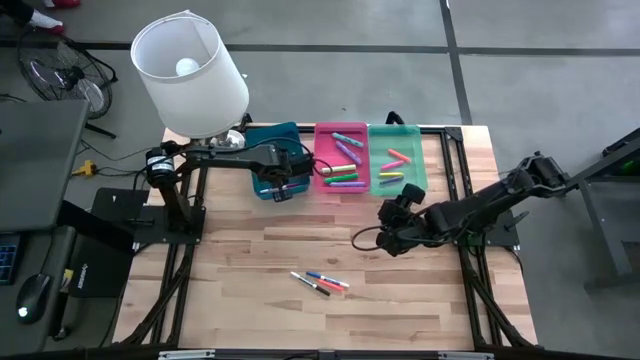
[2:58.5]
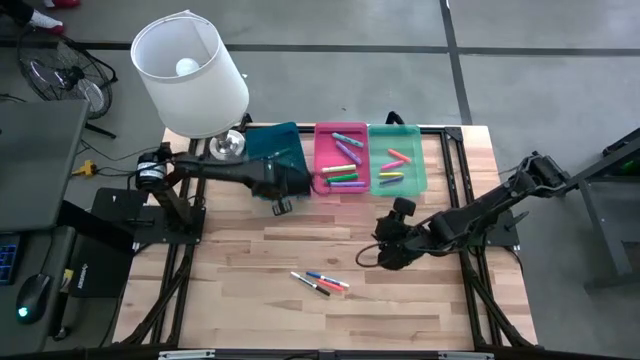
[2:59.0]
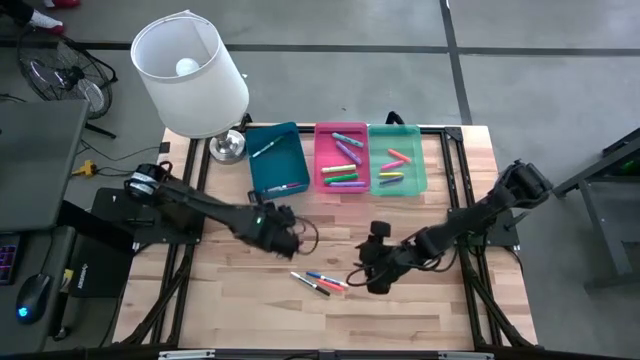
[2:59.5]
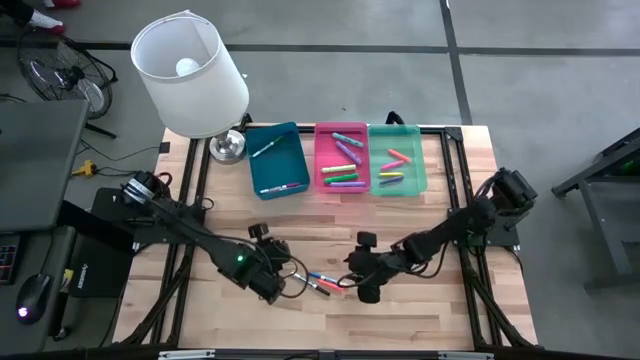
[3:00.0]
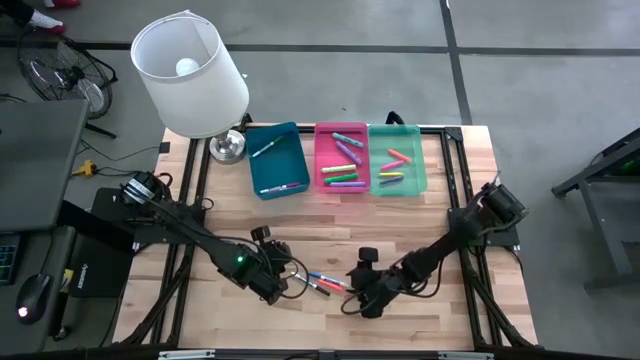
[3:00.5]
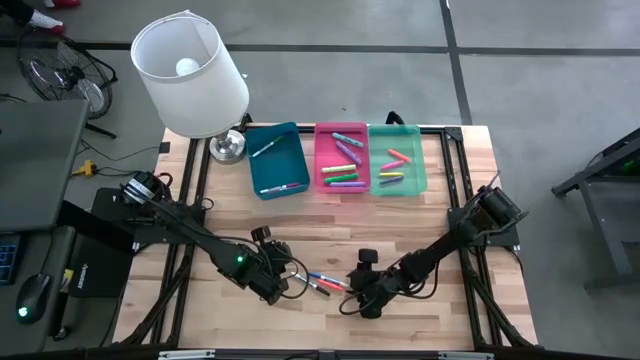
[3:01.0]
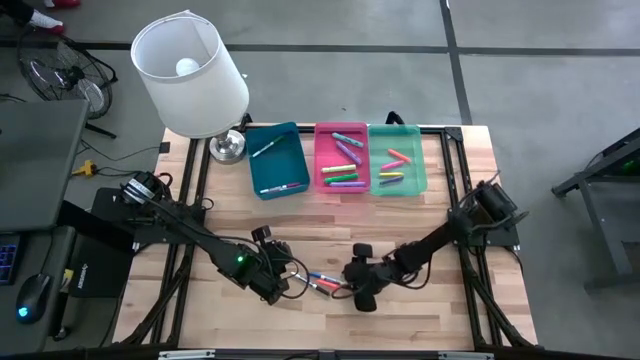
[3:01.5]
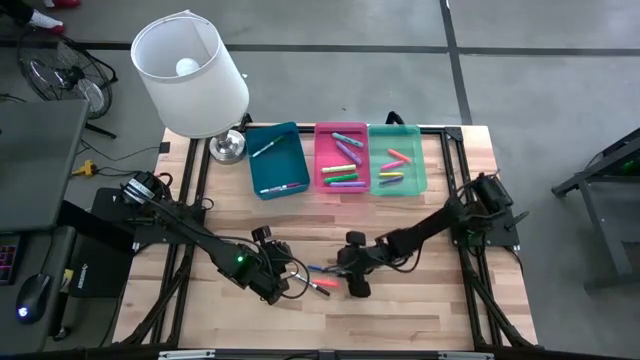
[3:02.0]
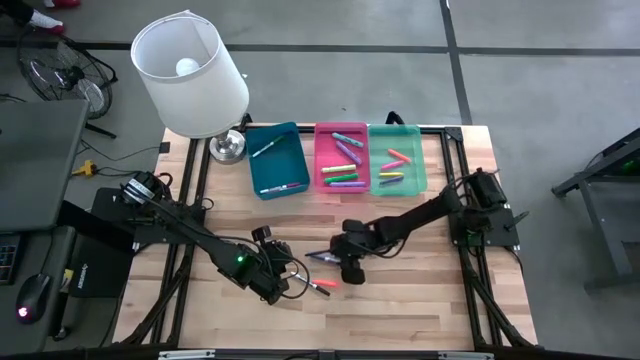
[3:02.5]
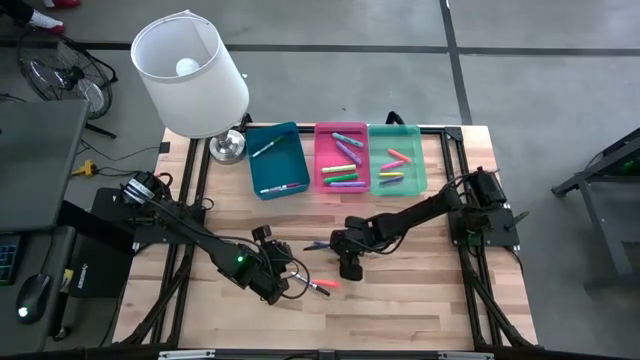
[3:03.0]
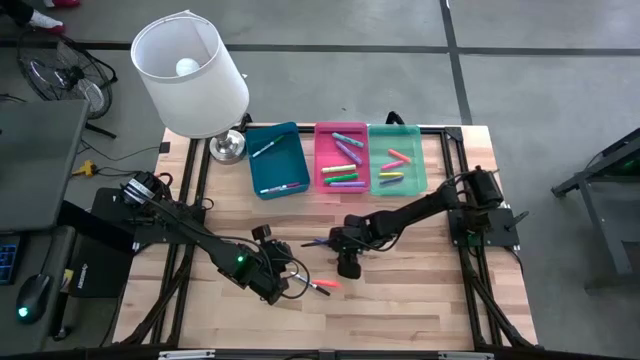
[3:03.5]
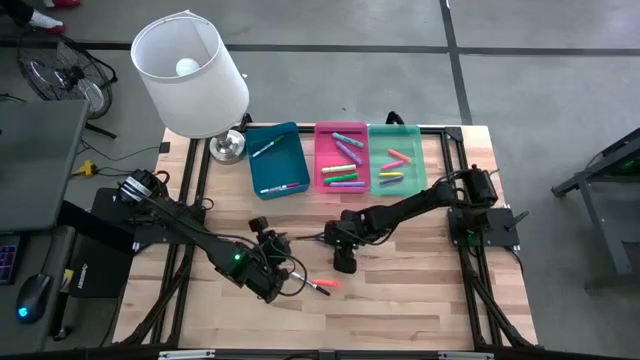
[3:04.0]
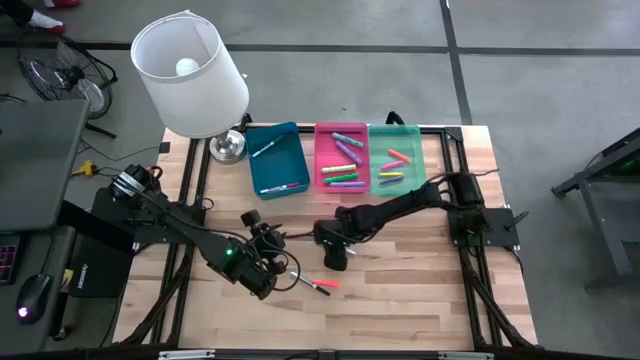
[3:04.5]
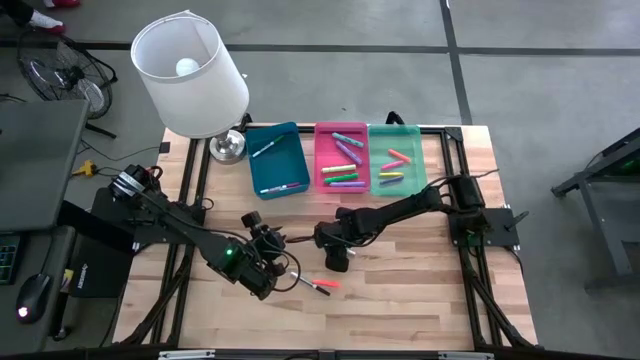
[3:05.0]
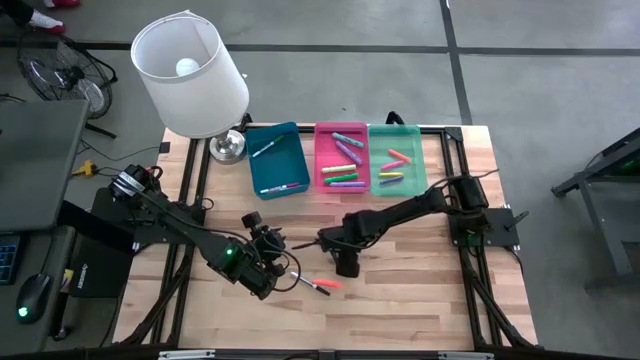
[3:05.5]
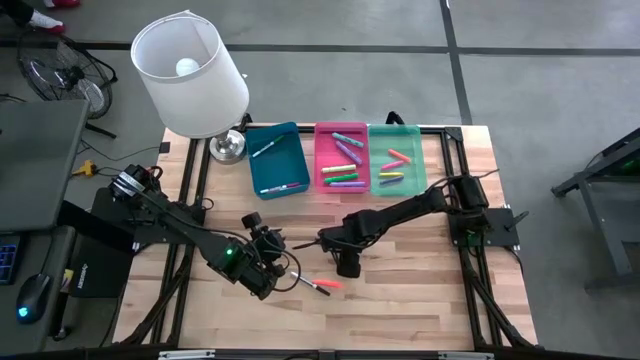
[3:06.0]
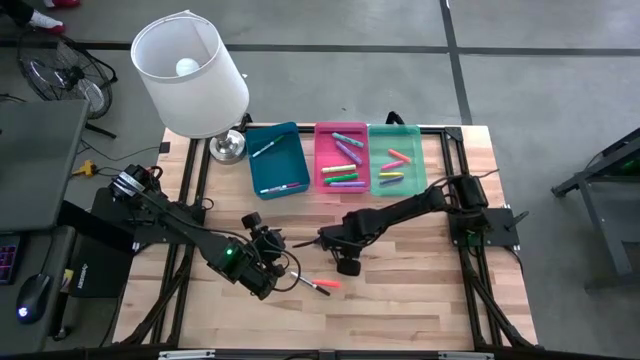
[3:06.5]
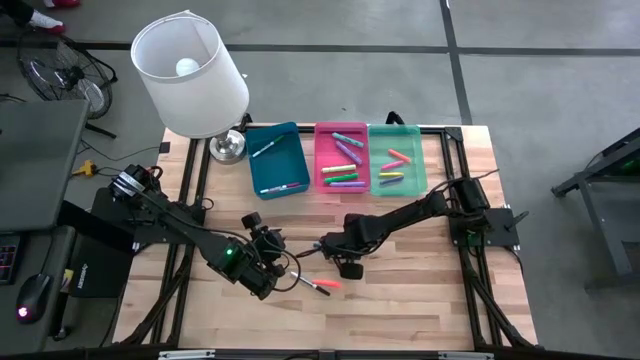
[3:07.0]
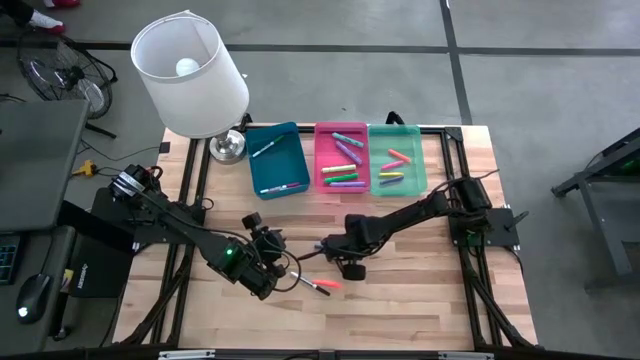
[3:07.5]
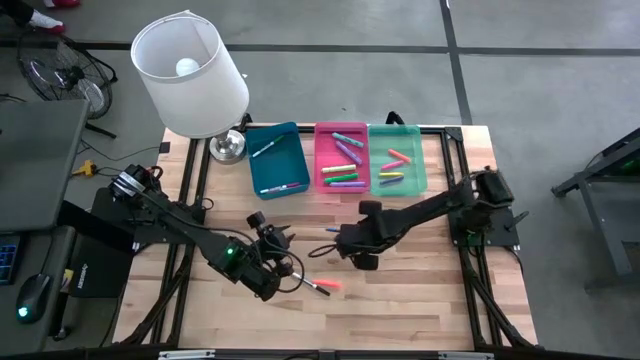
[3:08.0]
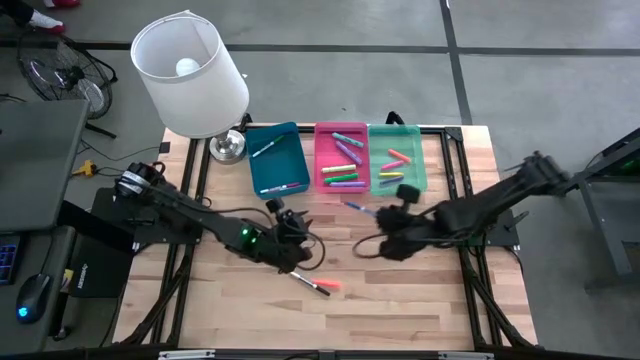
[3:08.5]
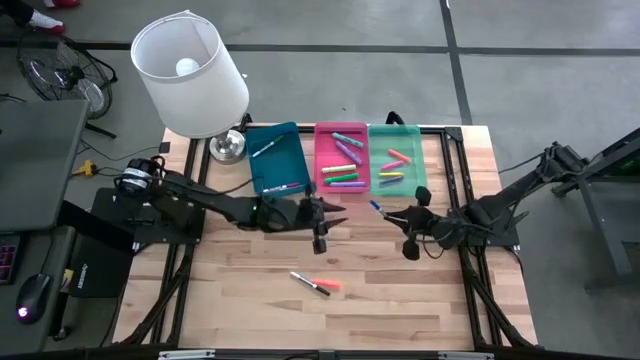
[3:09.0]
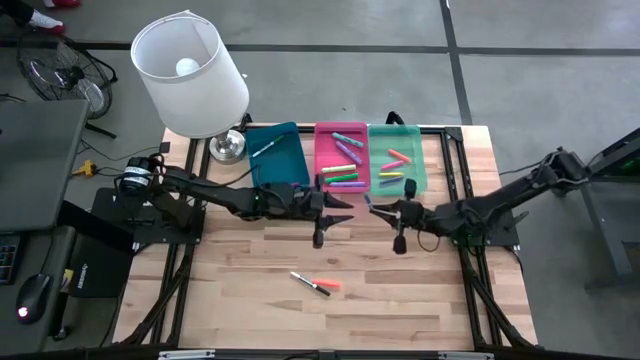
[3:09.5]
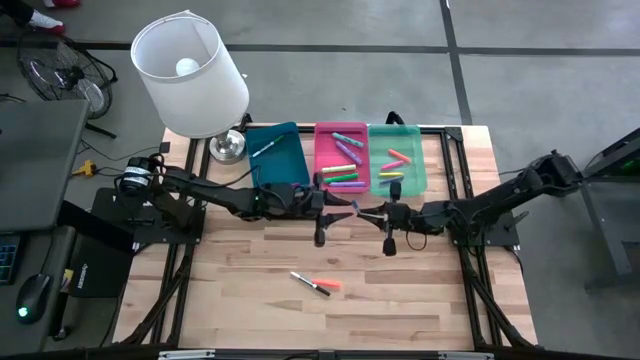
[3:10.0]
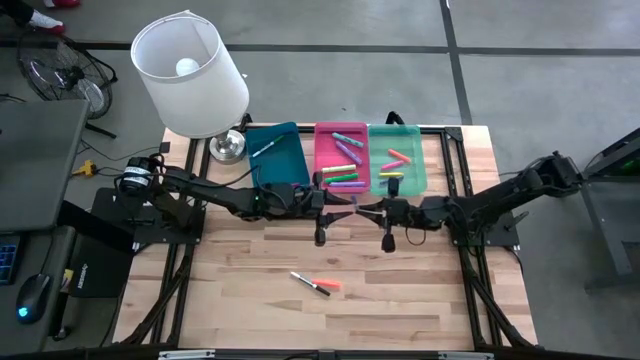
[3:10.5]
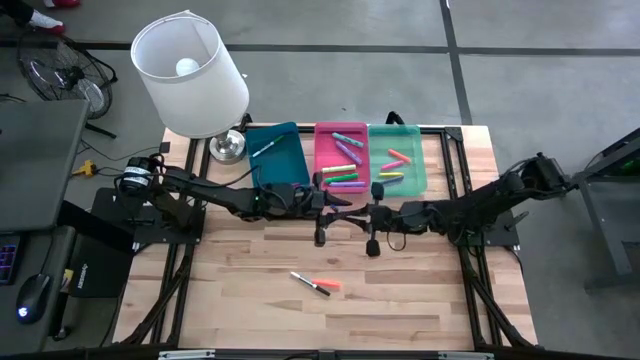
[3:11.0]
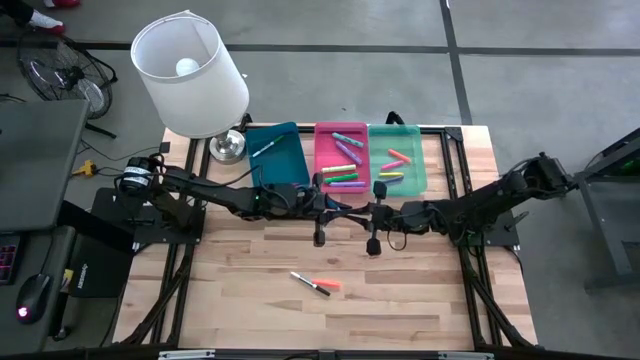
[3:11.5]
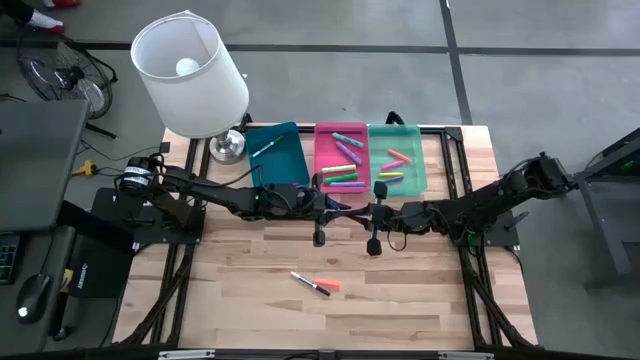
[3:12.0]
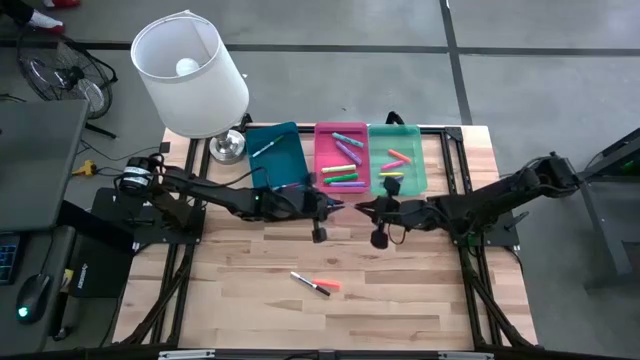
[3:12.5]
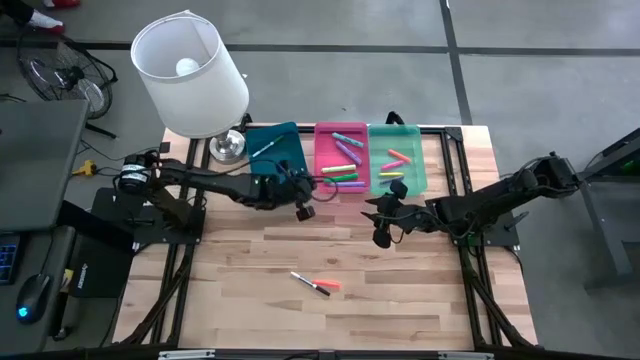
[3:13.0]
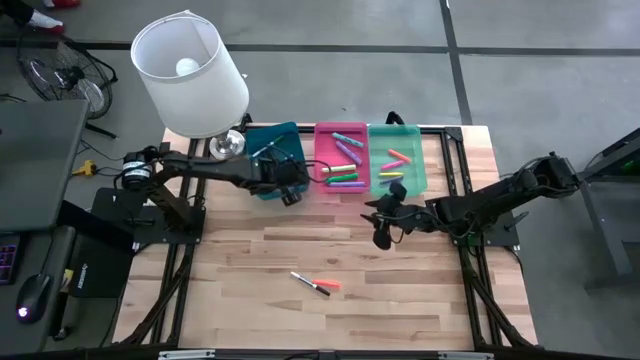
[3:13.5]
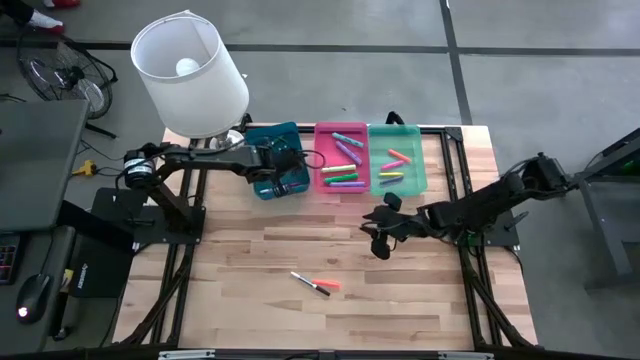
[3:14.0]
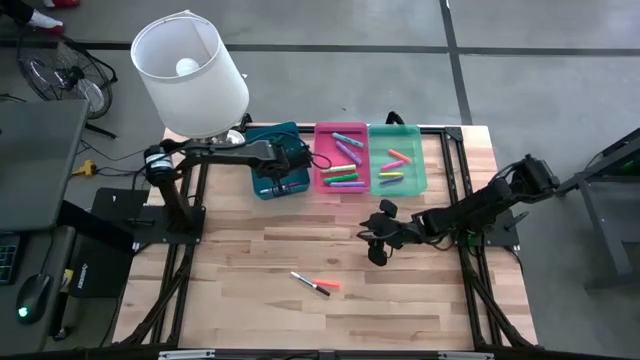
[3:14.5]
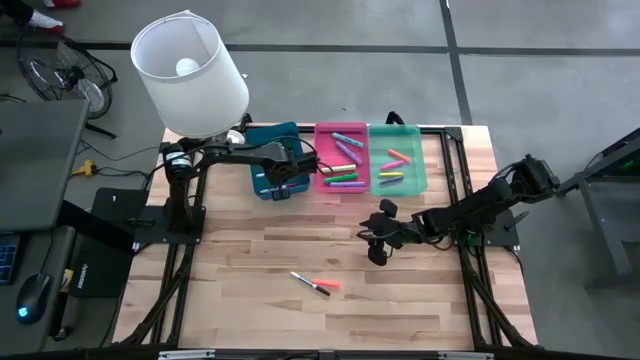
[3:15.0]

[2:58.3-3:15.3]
Task: Pick & Place Markers
Put the blue dry erase marker into the dark blue bin

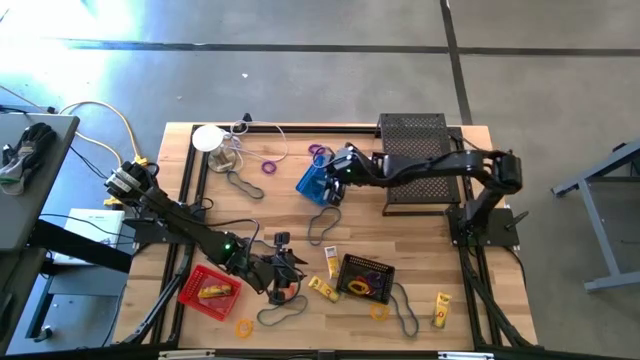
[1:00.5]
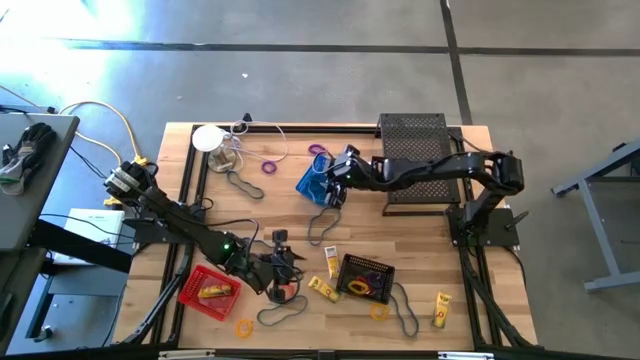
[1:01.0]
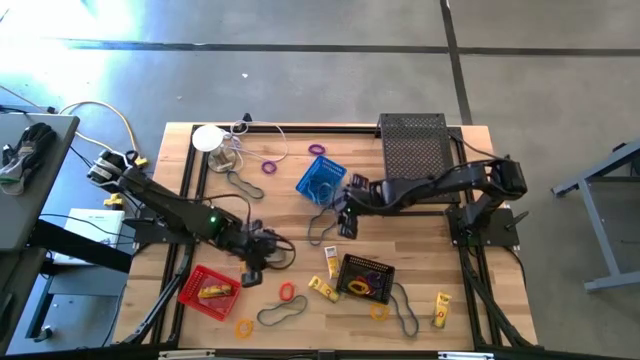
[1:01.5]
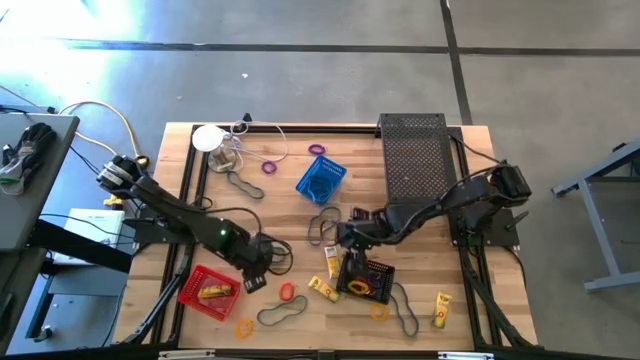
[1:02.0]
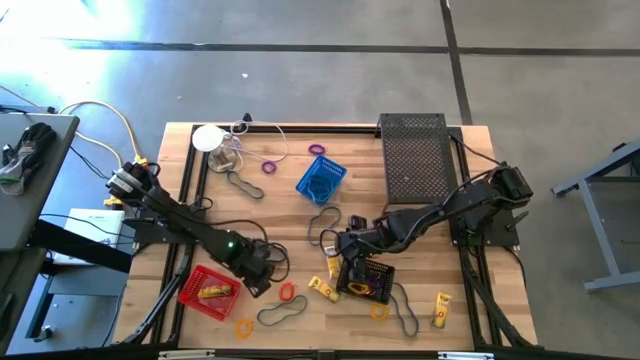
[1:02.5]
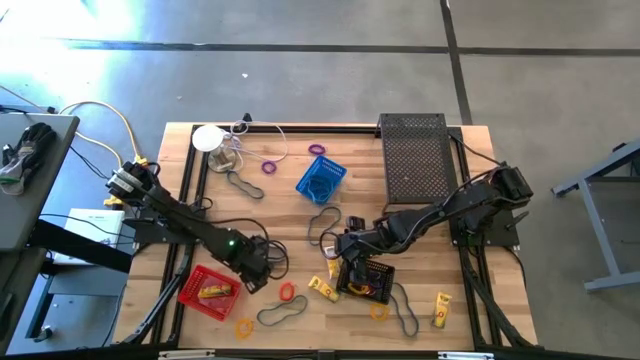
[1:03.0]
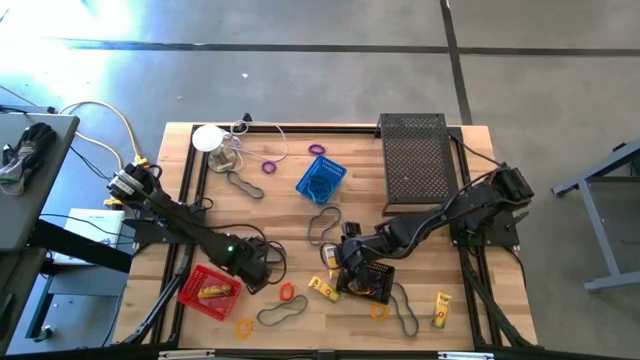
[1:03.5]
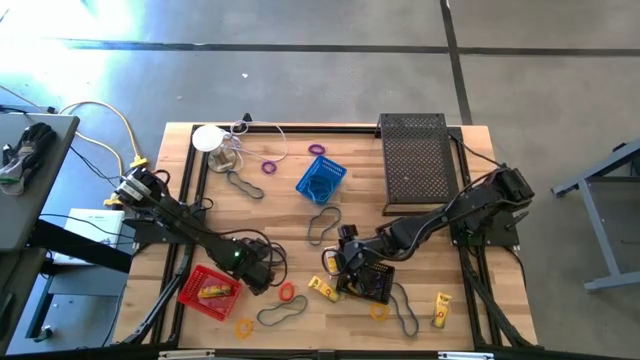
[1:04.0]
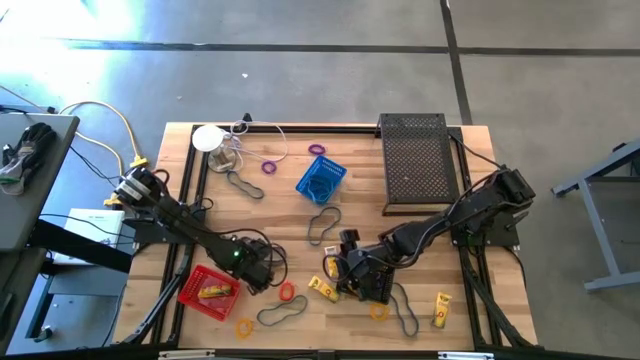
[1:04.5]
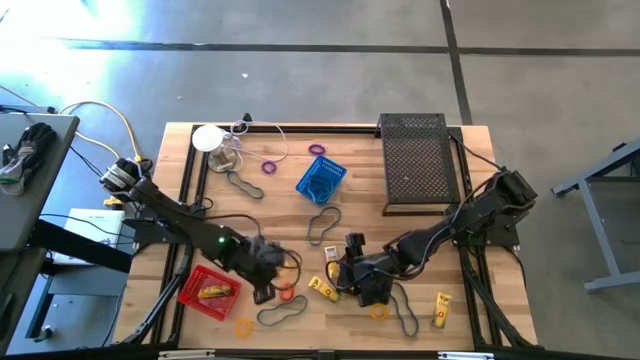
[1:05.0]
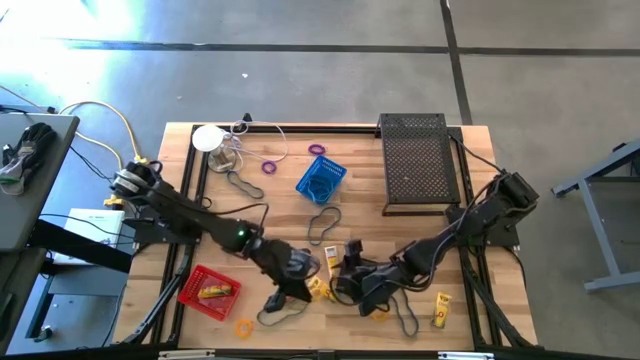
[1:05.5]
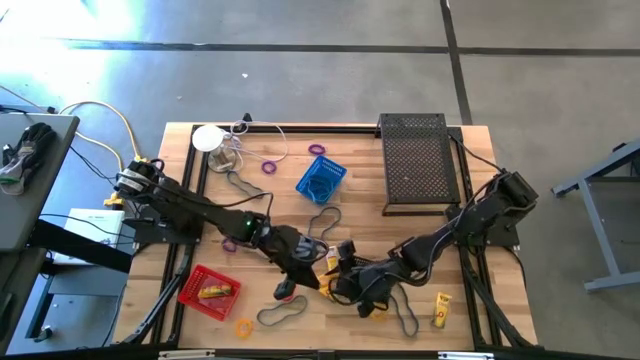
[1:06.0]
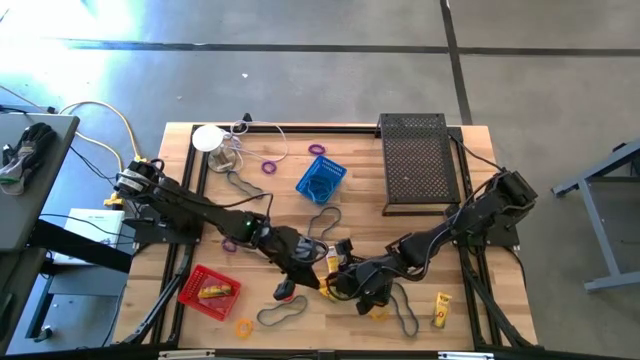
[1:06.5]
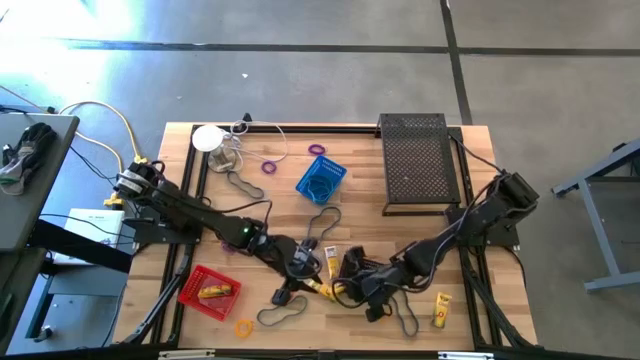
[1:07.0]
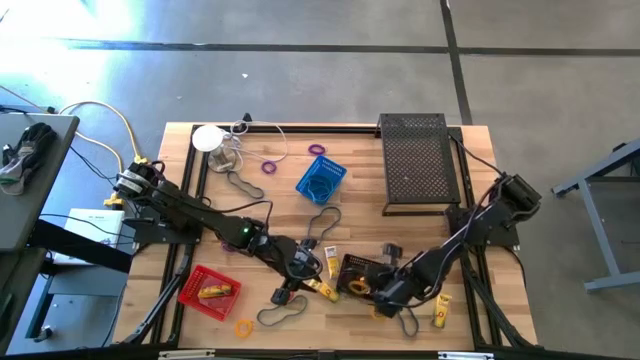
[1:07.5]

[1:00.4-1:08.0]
Task: Pick & Place Office Desk Supplies
Put the top yellow wrist coil keychain into the black bin
